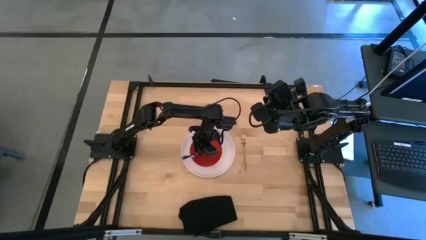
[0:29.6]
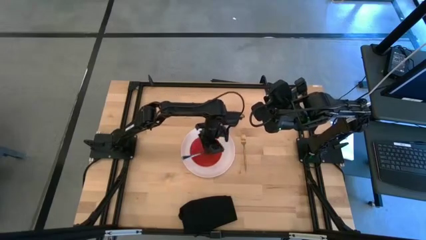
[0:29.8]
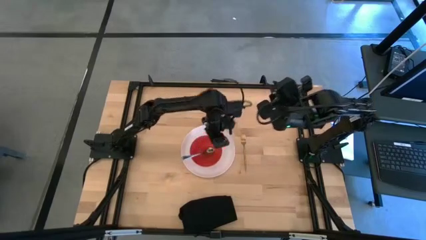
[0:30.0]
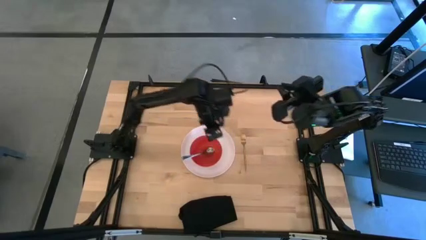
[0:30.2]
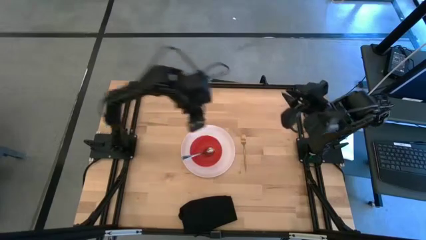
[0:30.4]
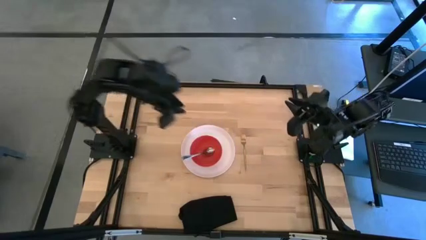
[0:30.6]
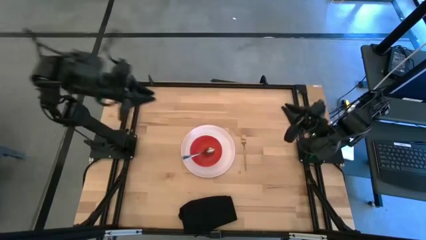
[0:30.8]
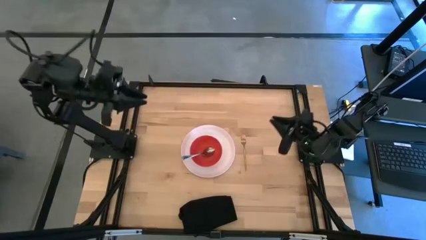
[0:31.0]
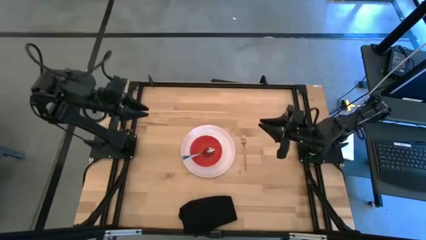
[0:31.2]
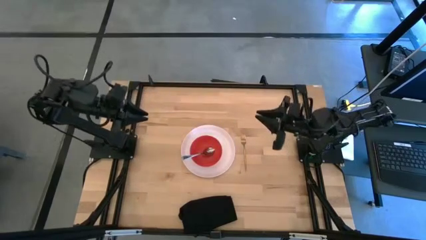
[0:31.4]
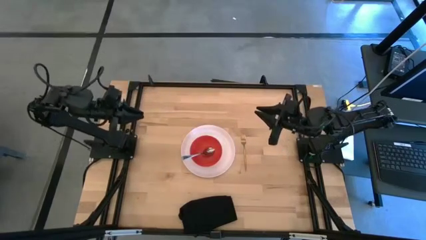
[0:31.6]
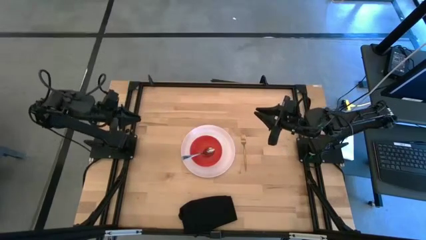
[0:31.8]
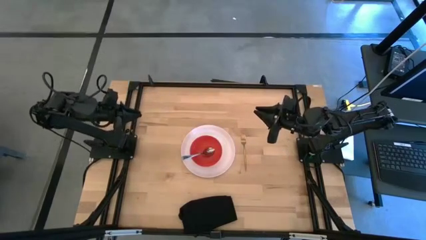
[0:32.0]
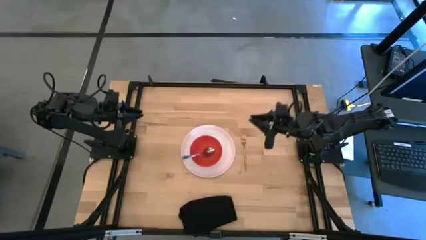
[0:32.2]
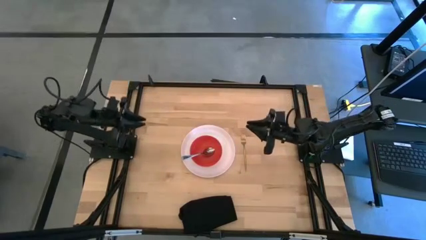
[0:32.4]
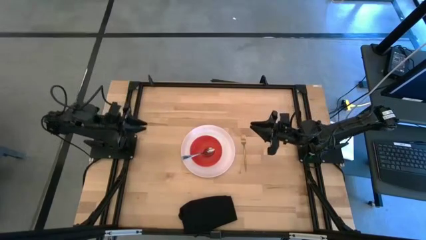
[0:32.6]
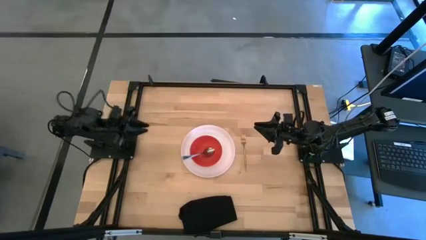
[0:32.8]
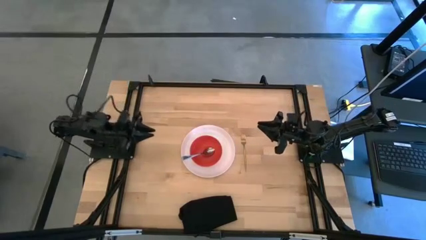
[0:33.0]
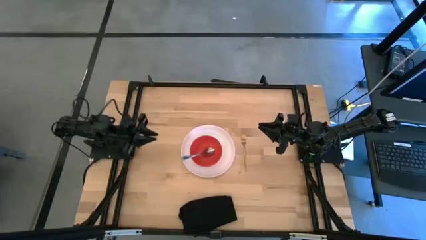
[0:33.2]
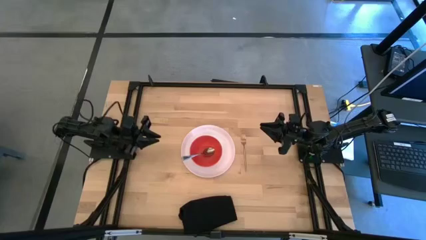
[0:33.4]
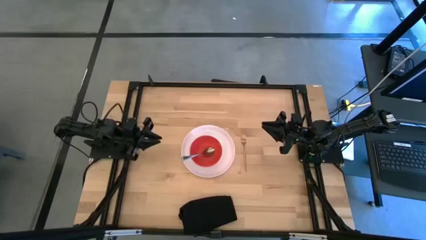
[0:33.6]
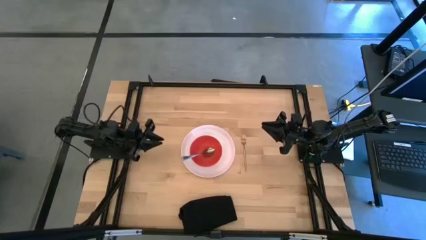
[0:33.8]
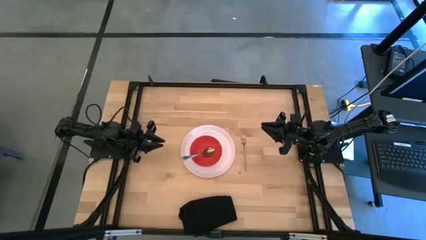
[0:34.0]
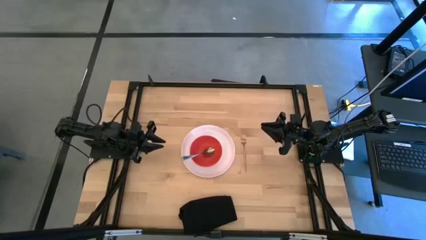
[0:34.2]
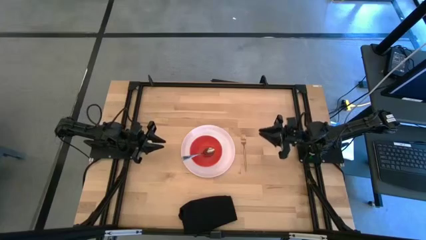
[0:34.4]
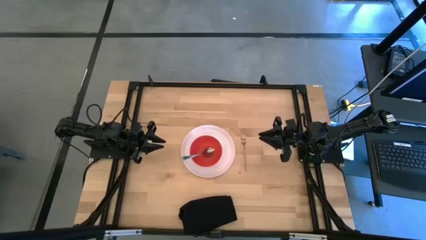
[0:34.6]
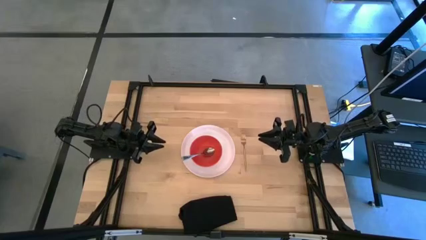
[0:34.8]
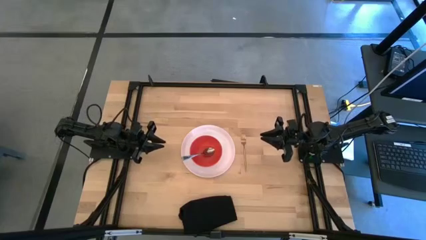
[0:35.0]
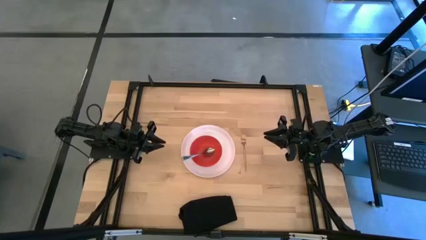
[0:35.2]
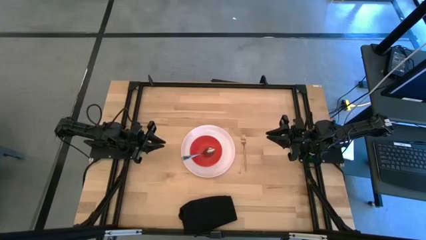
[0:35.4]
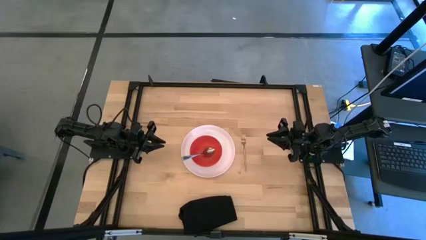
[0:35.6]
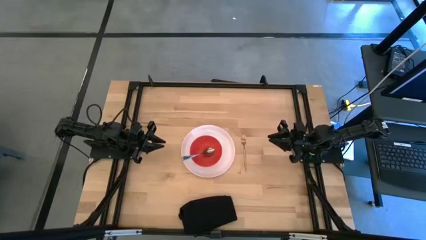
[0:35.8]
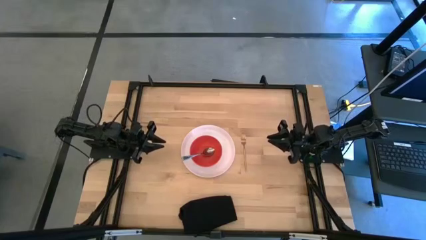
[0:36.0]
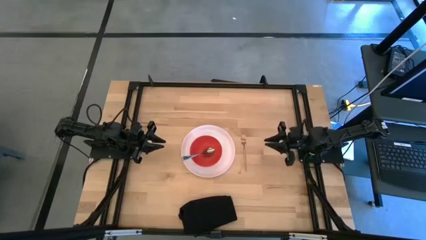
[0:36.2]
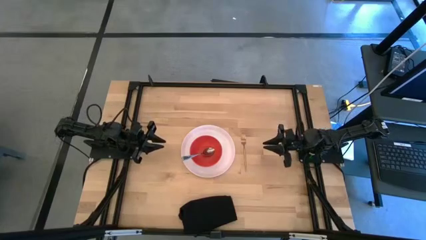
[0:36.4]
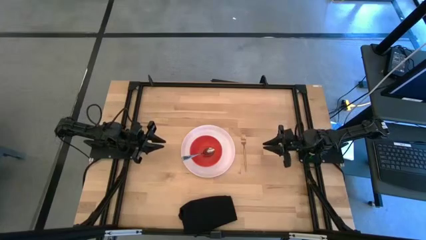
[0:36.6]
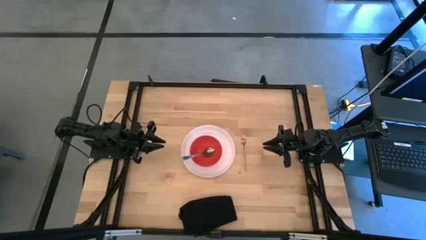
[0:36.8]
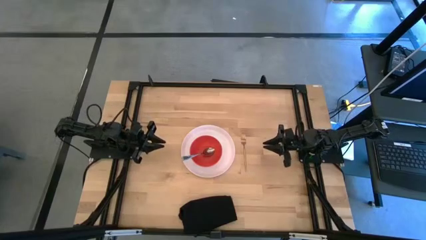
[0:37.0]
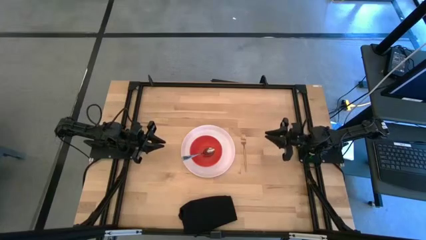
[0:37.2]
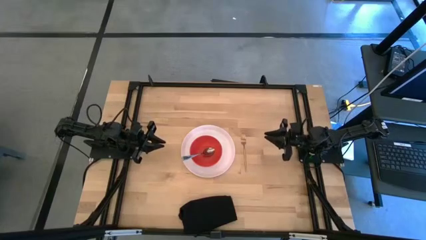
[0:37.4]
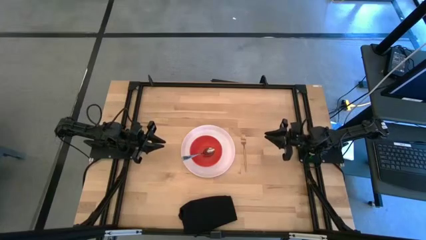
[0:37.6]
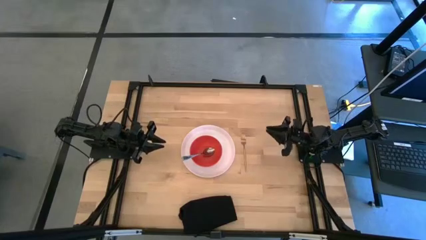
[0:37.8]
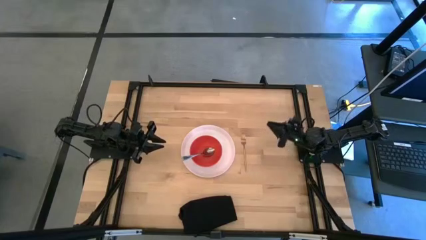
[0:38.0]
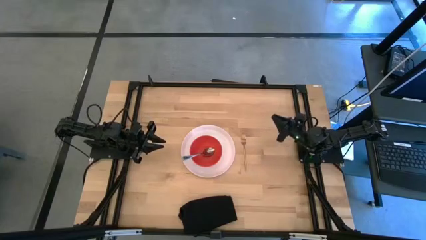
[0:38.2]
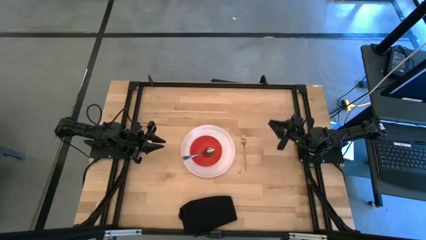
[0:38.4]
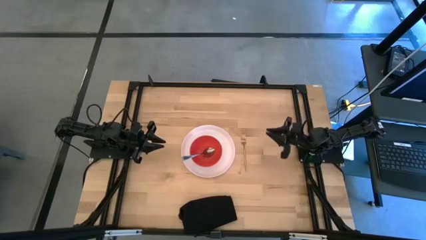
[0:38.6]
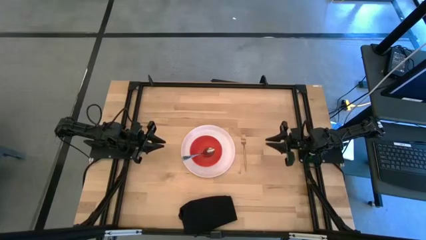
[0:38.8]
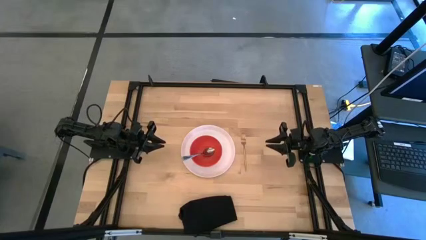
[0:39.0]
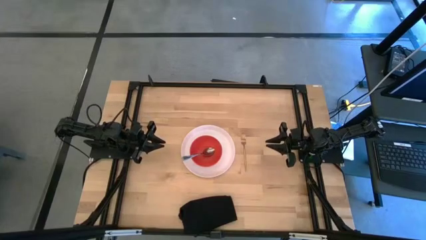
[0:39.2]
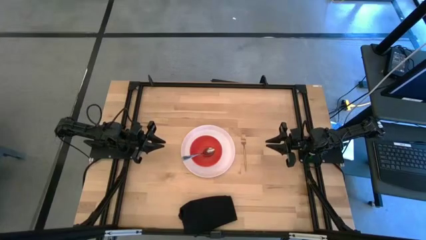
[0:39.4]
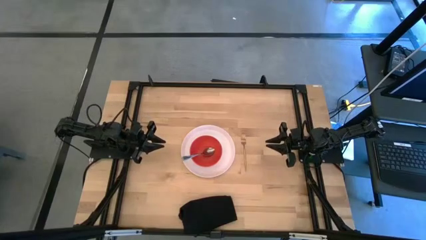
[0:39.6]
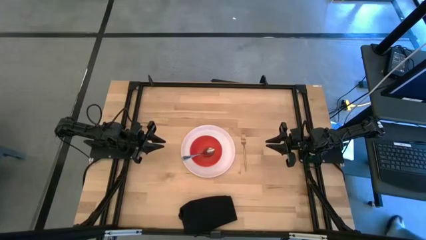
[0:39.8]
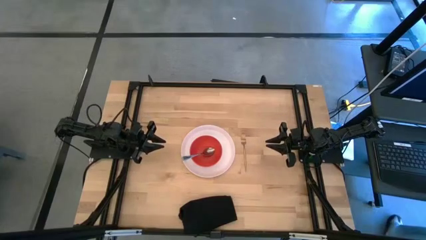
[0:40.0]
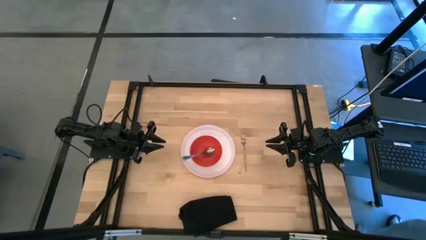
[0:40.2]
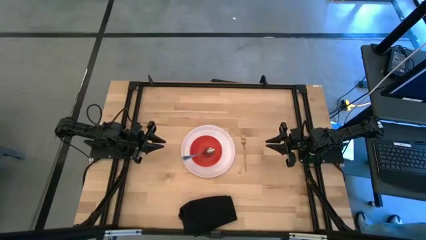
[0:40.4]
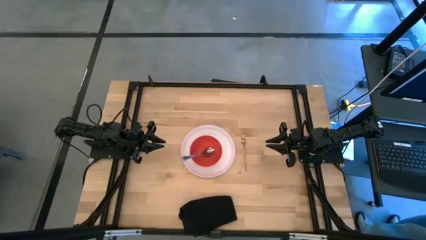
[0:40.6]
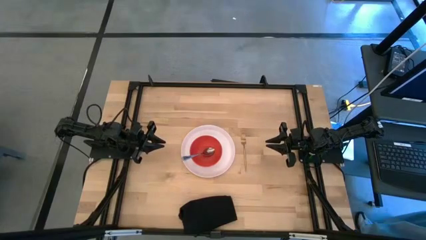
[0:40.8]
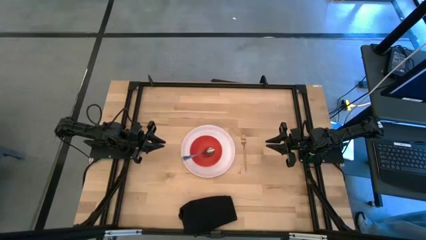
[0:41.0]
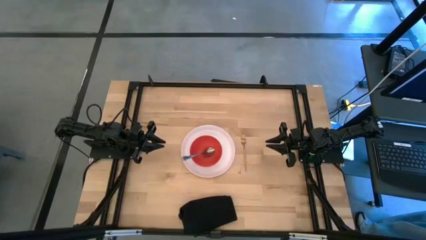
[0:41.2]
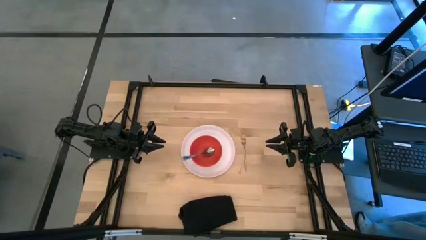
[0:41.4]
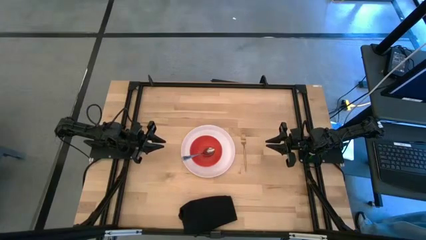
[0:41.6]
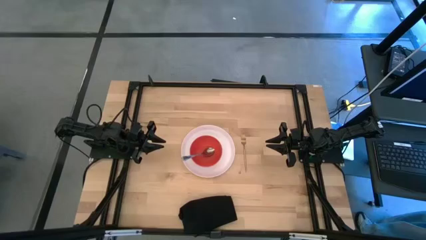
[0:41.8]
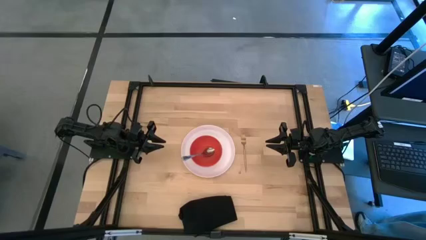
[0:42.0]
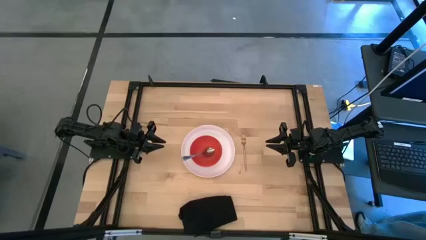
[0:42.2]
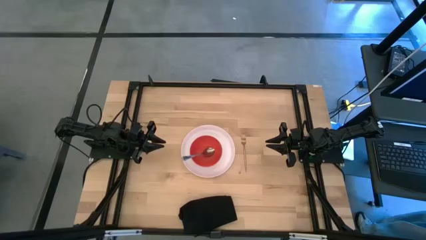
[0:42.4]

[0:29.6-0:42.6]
Task: Set table place
Return to Home Position
